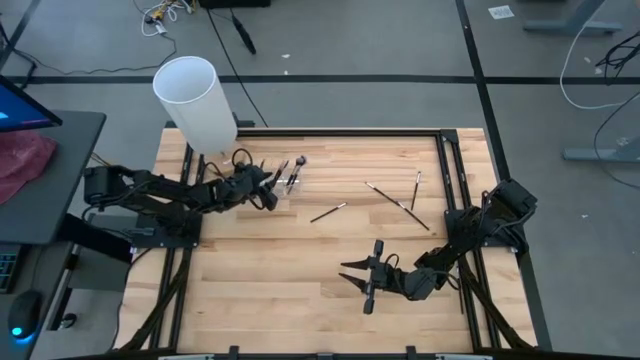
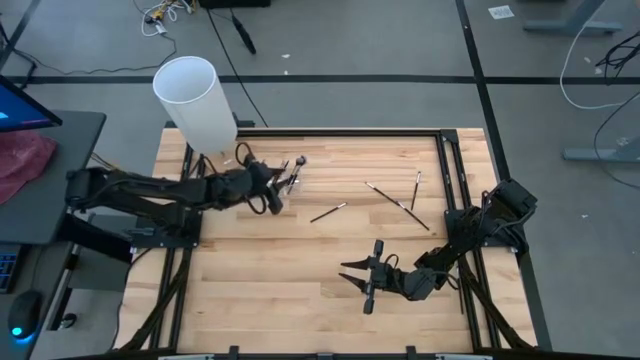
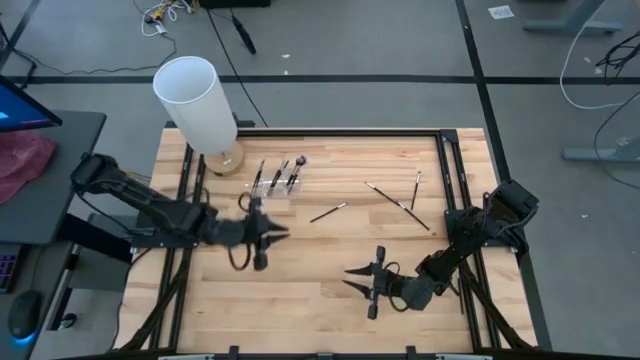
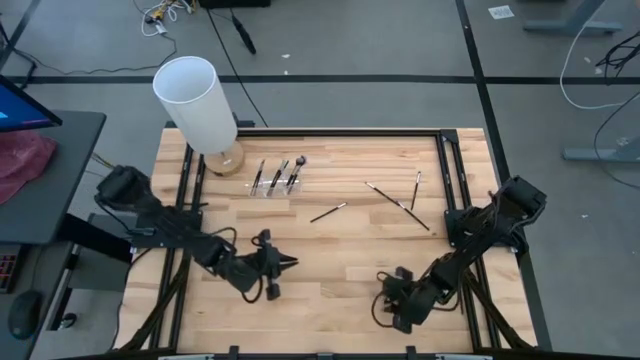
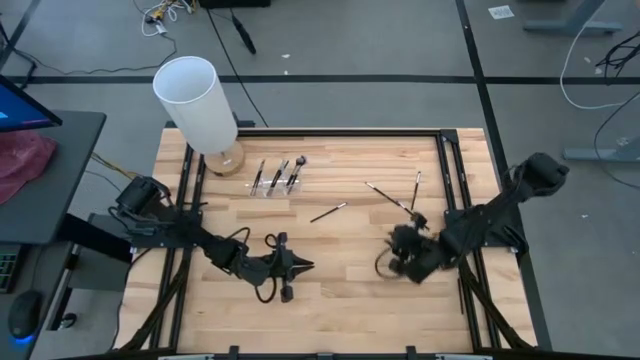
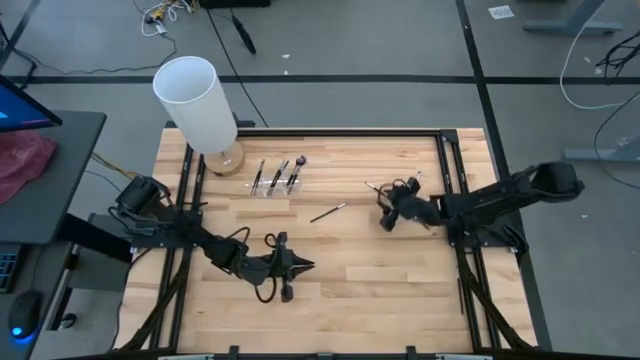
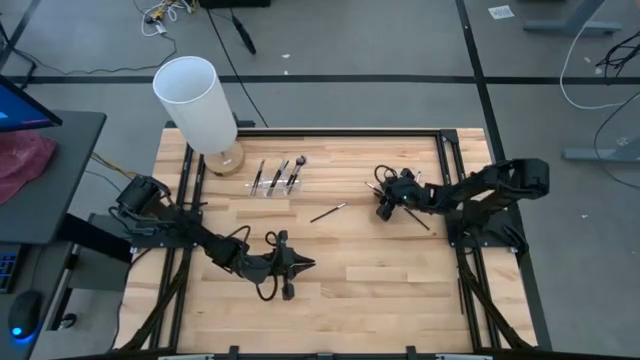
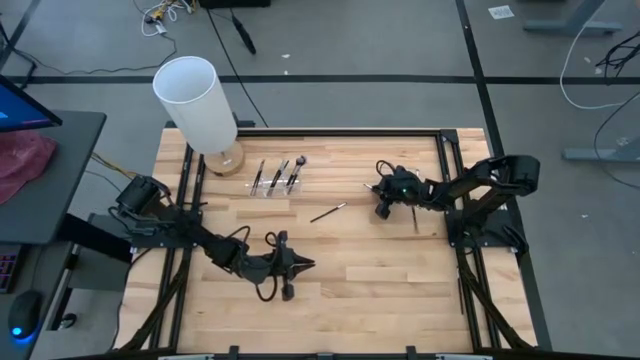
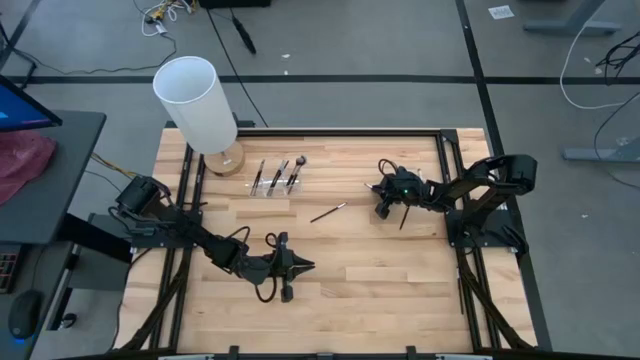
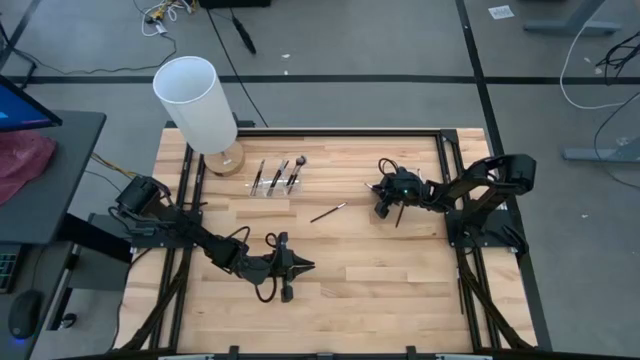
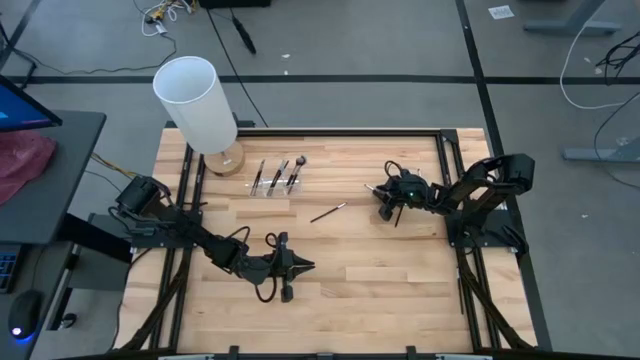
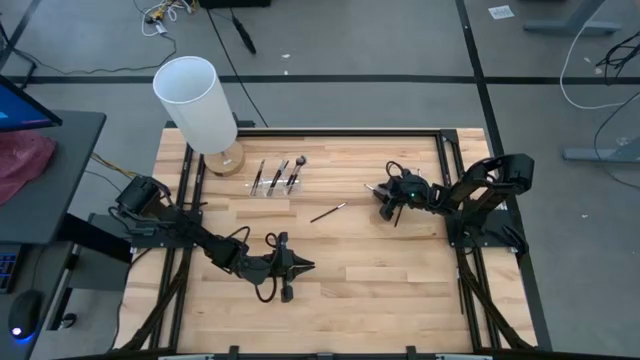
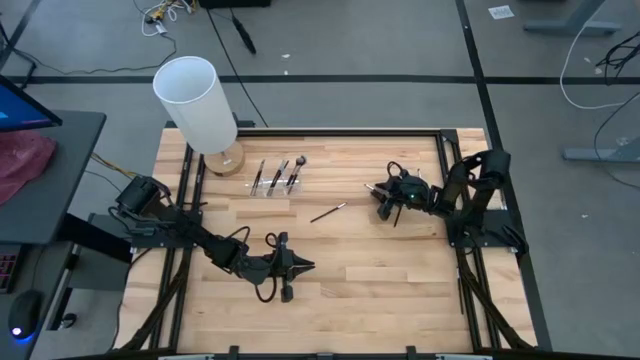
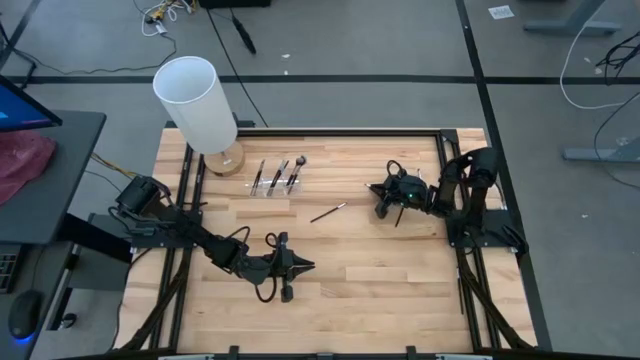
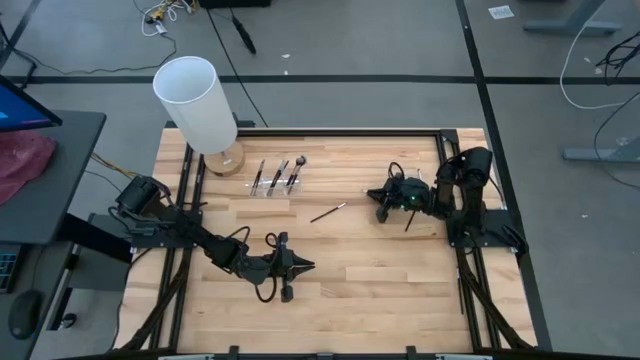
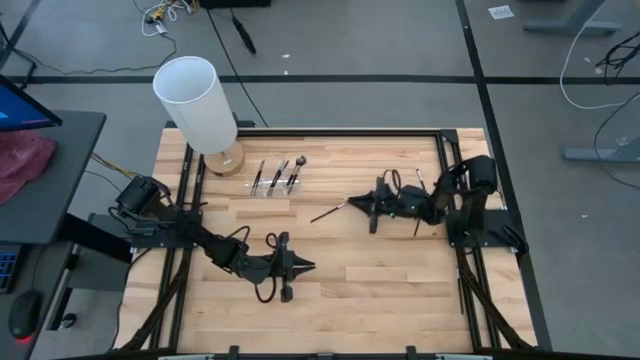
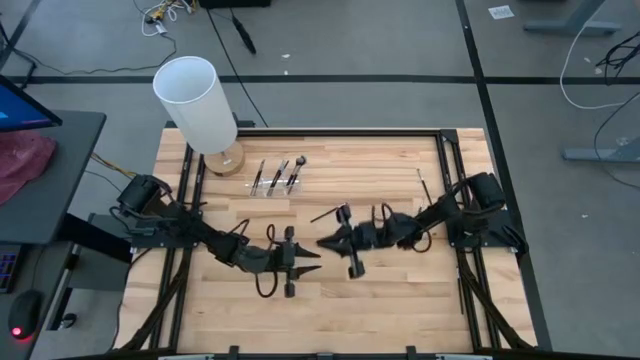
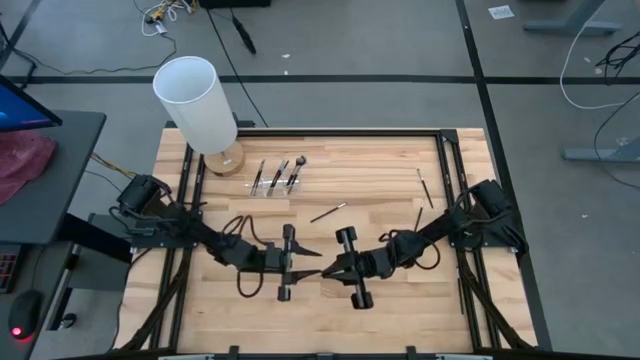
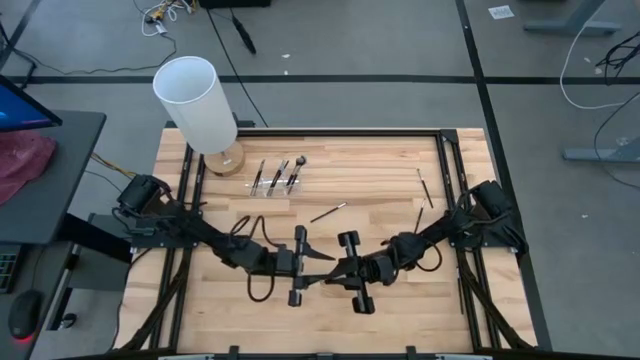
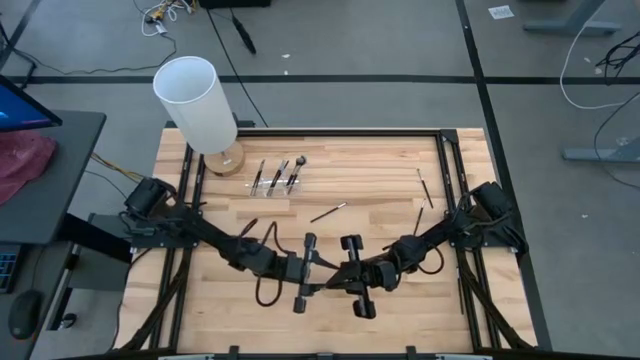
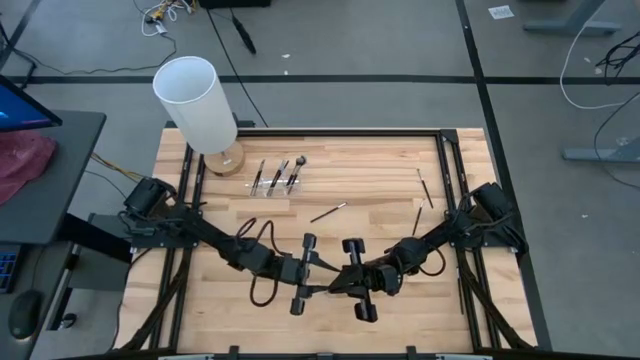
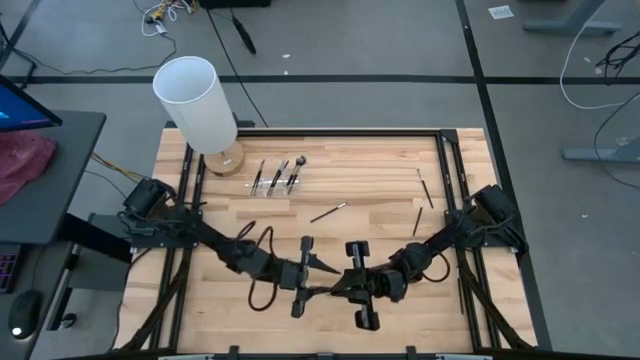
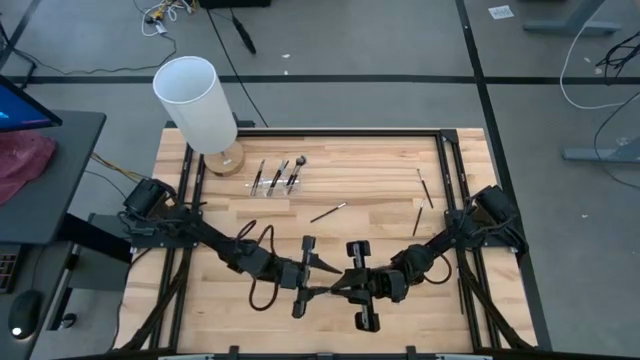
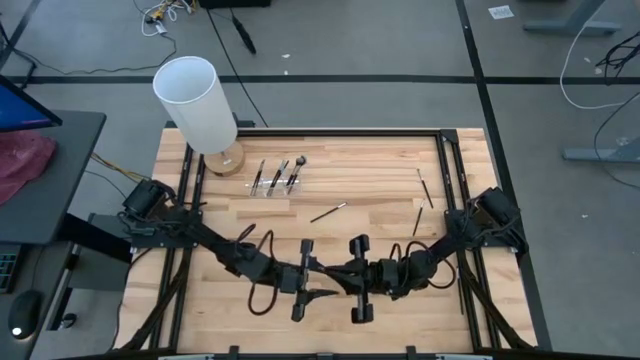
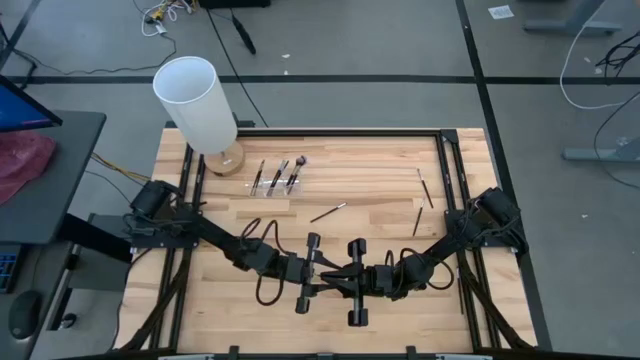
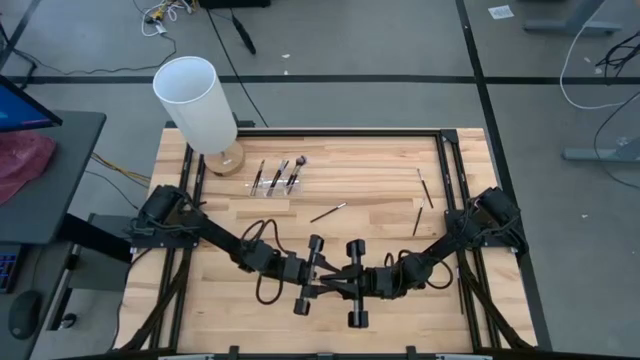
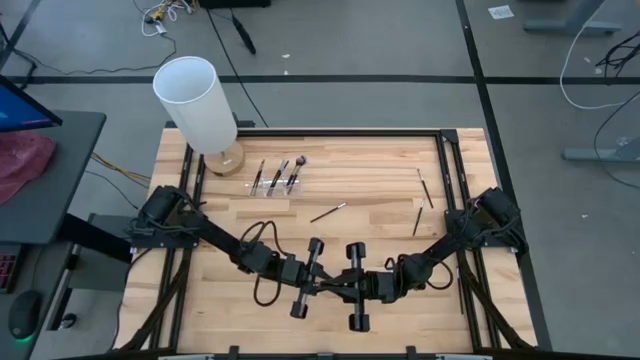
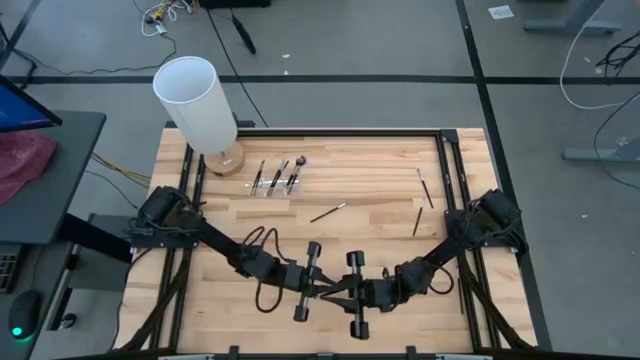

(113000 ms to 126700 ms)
Task: Put items in baskets/containers
Put the eyeshadow brush into the transparent organizer

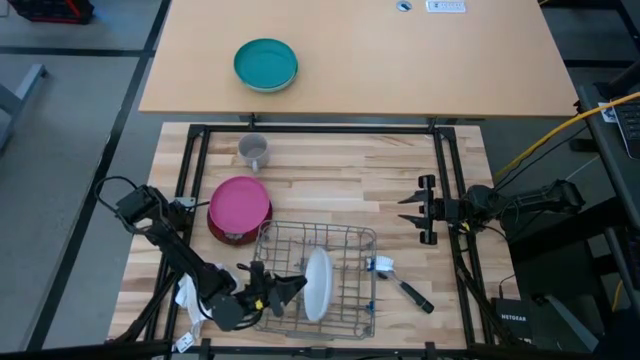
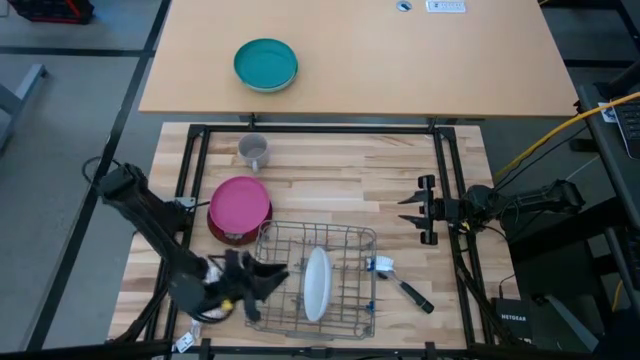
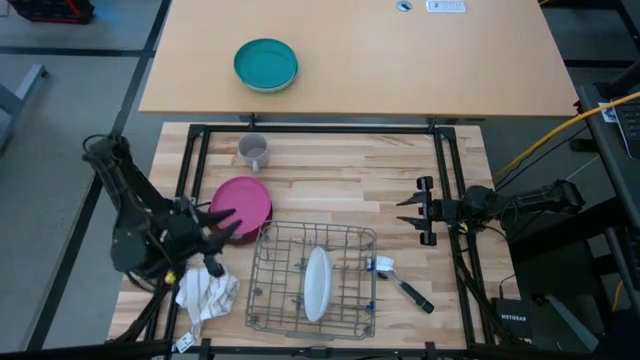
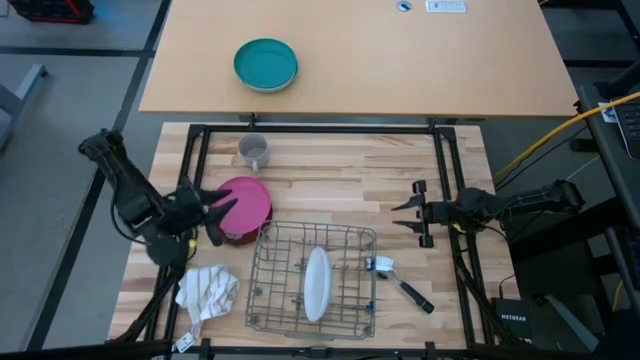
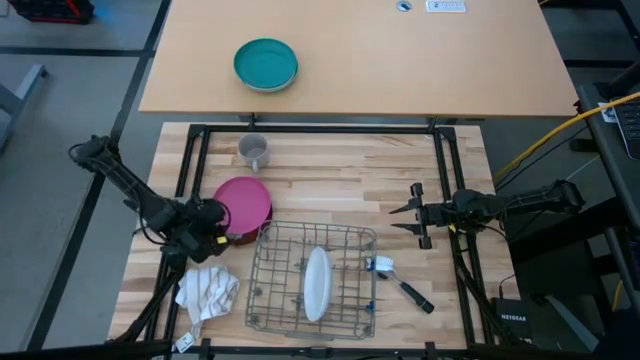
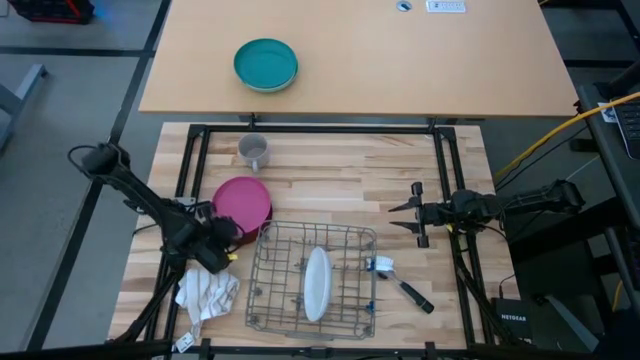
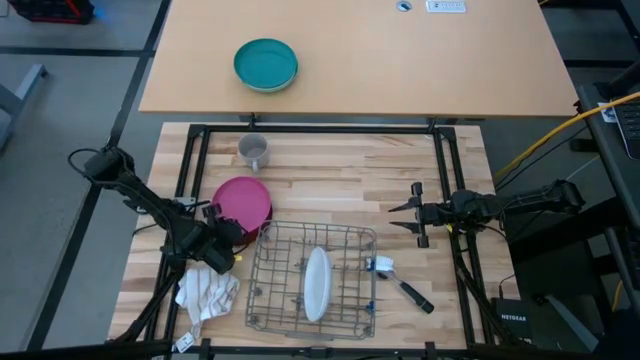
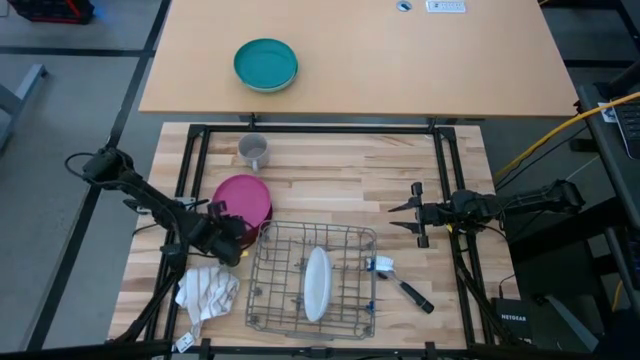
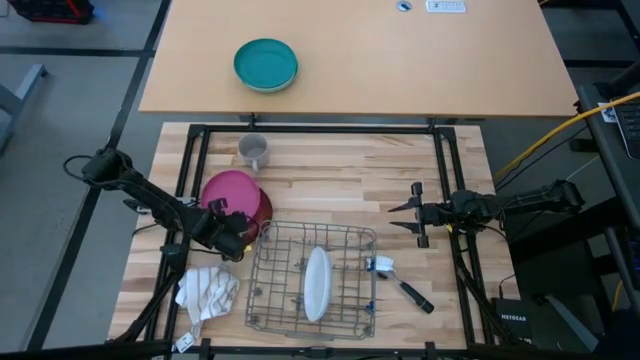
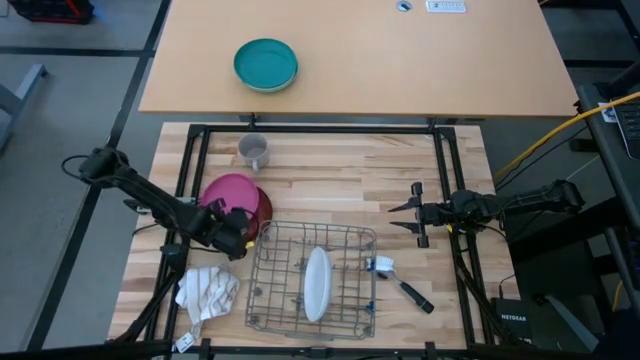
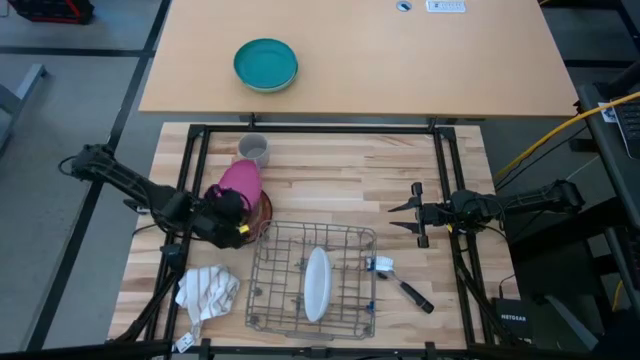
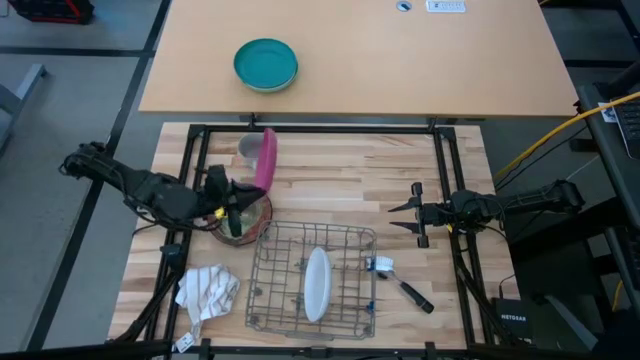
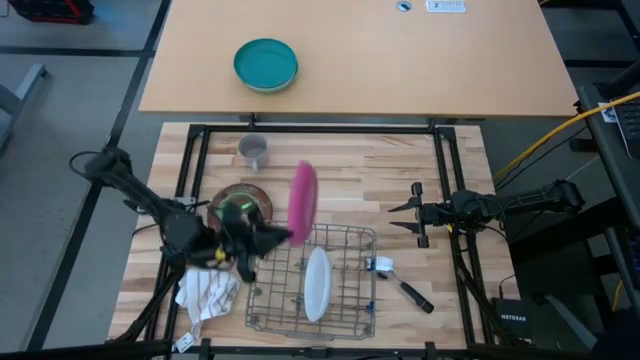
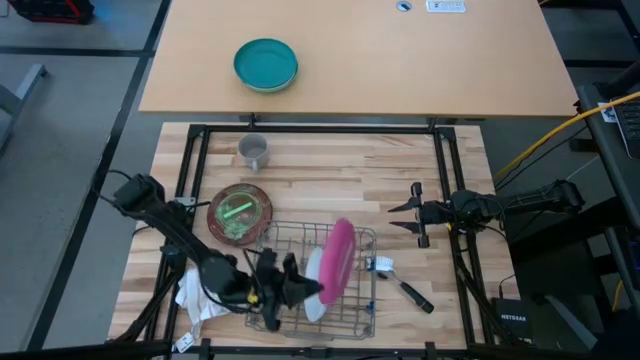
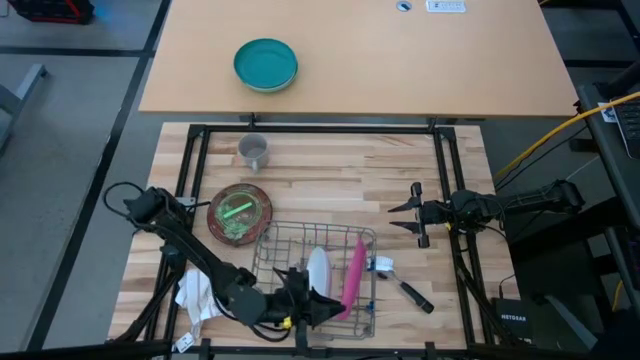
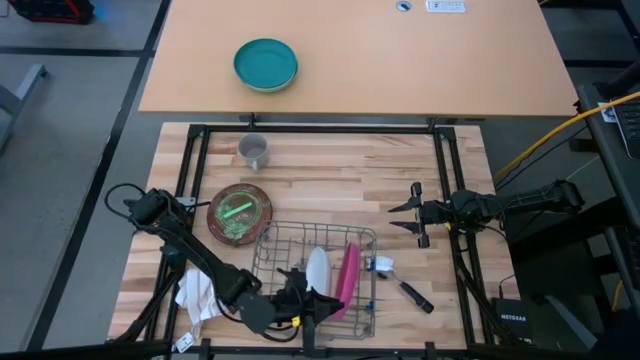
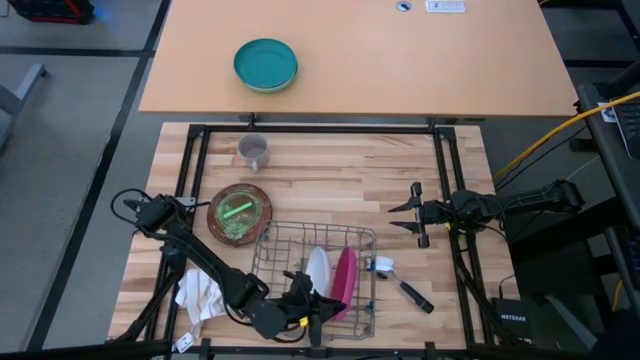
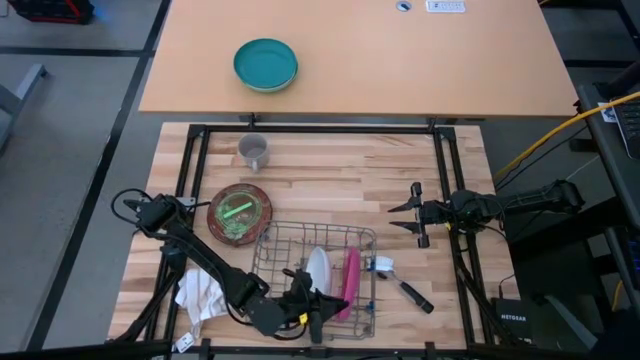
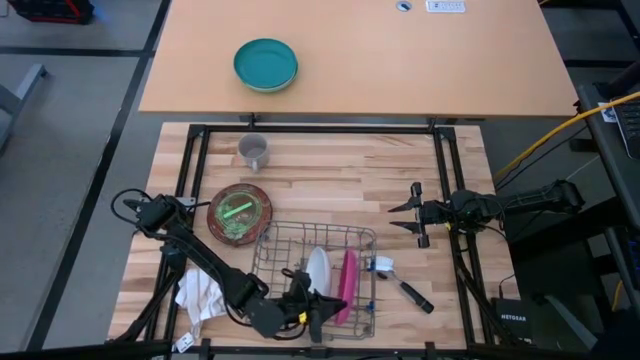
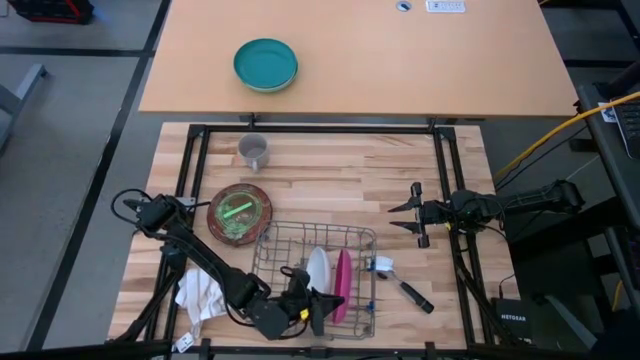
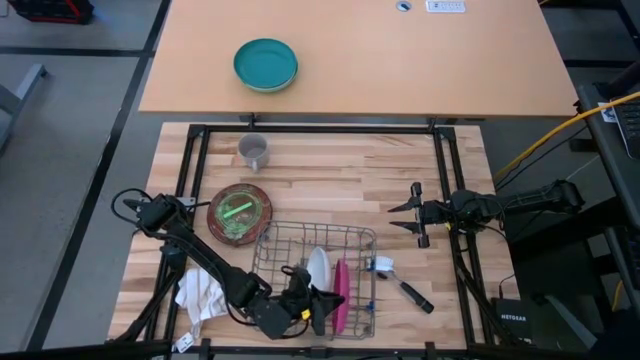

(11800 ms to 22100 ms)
Task: Sort dishes
Put the pink plate into the dish rack
